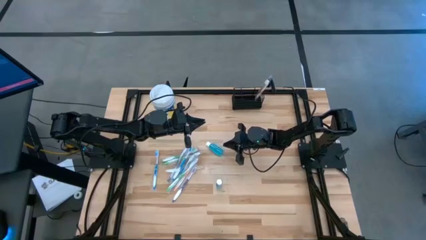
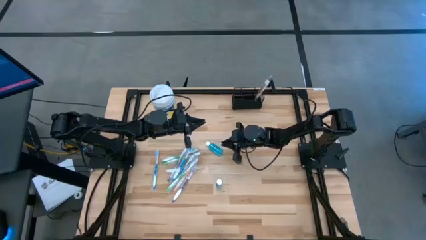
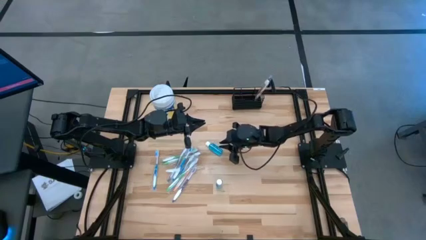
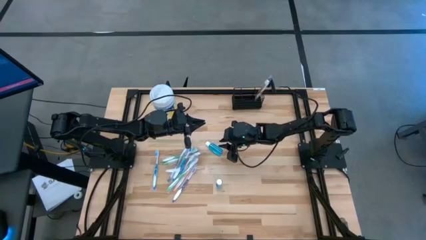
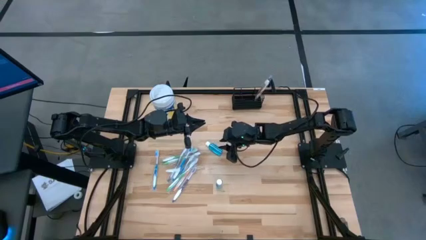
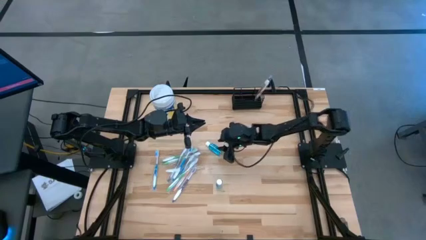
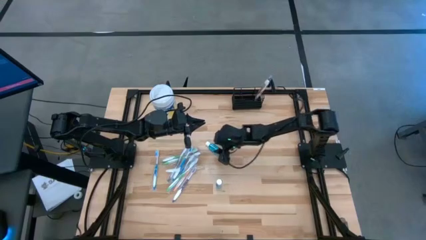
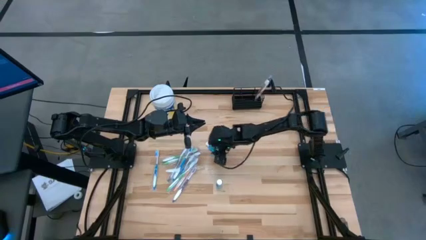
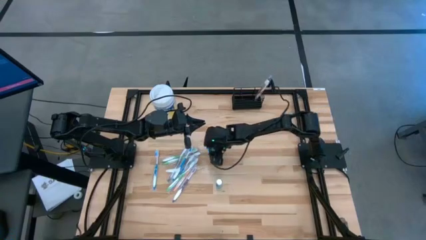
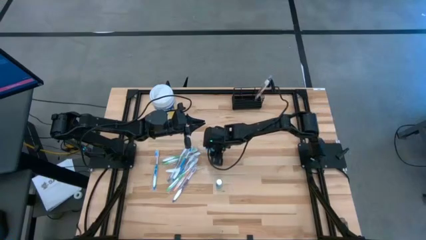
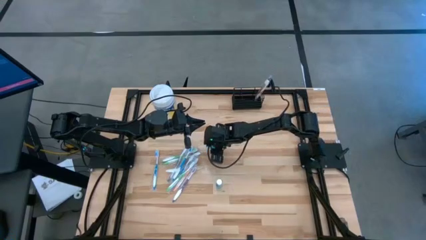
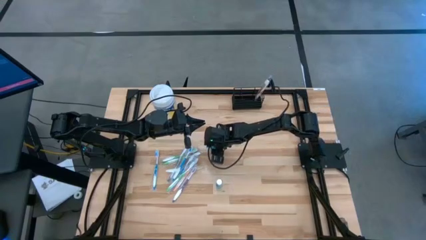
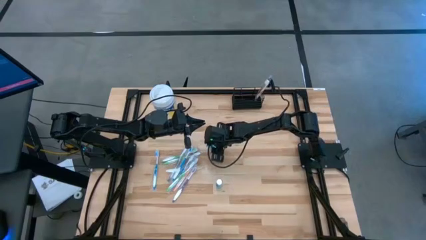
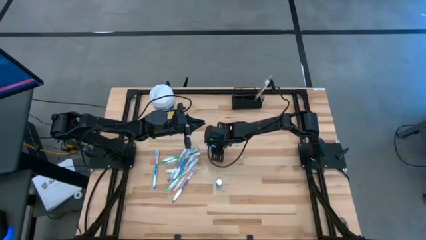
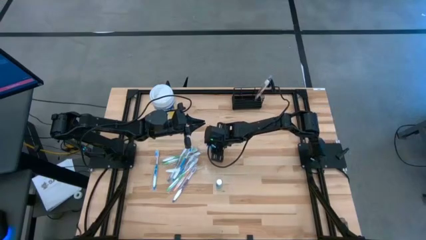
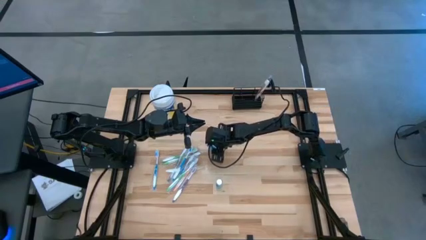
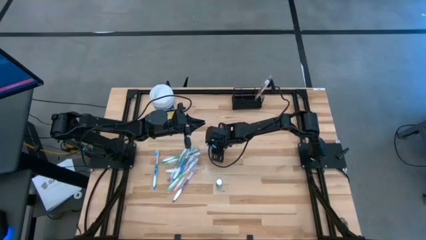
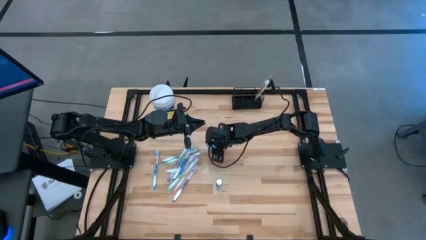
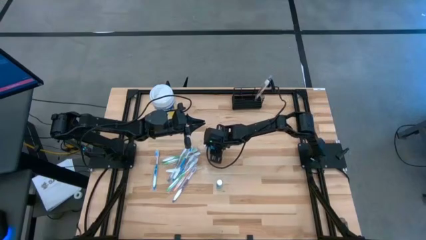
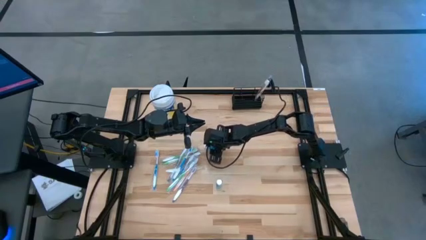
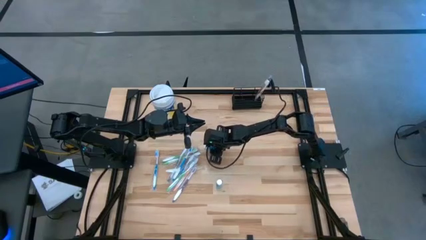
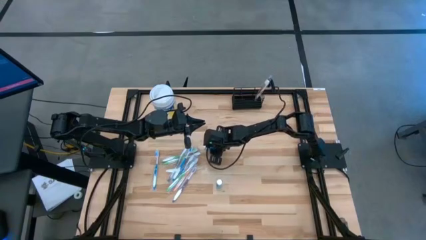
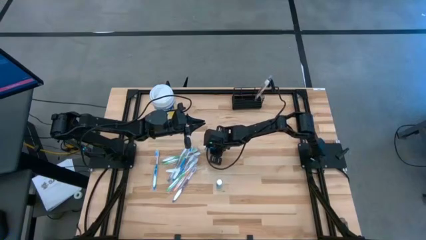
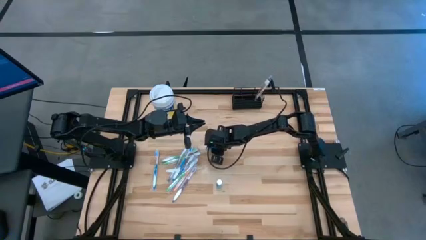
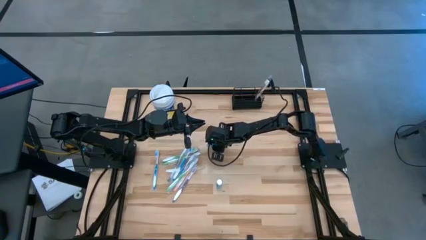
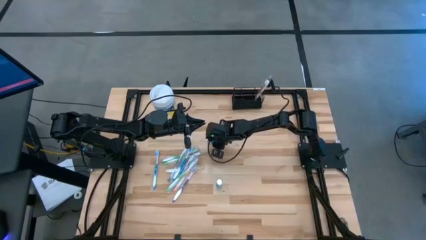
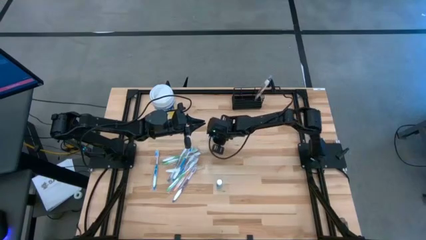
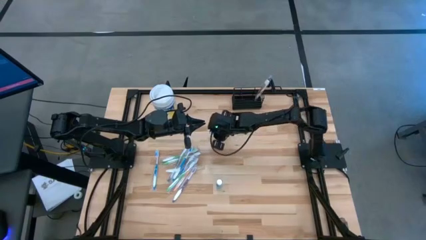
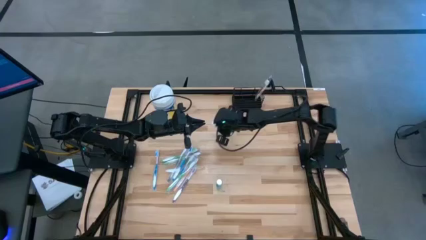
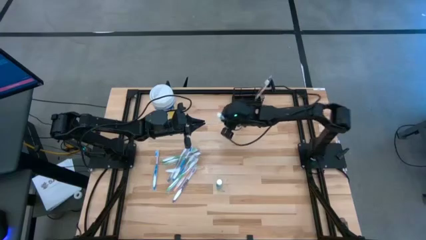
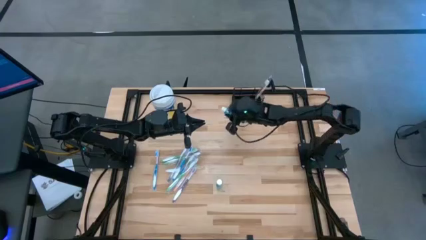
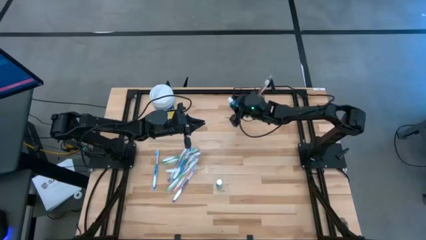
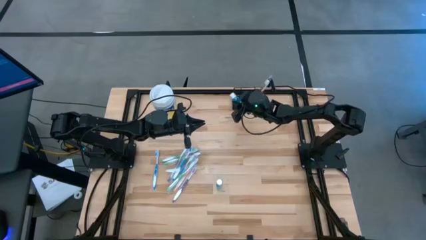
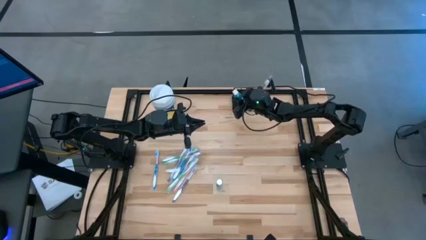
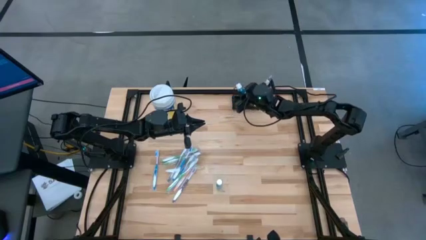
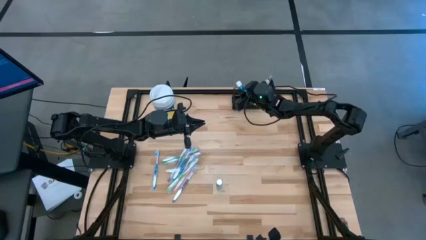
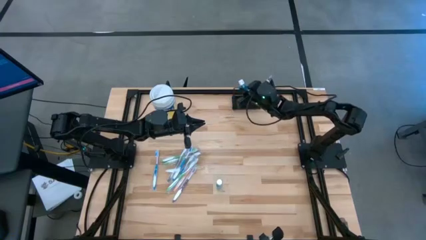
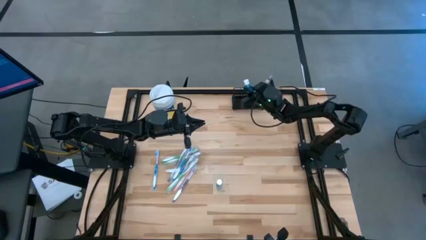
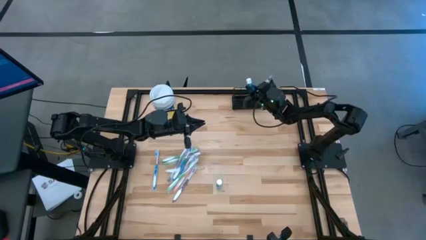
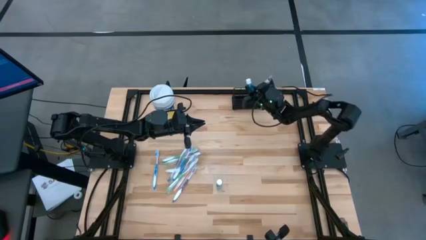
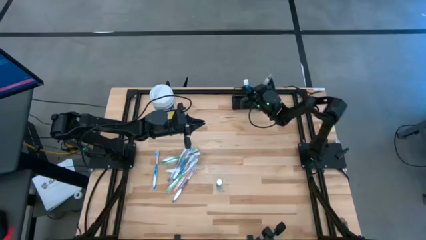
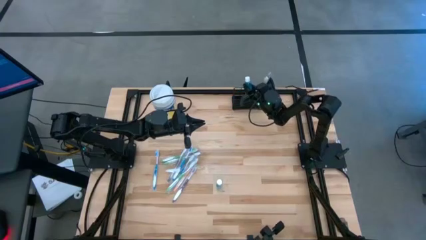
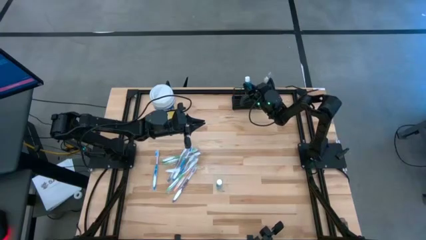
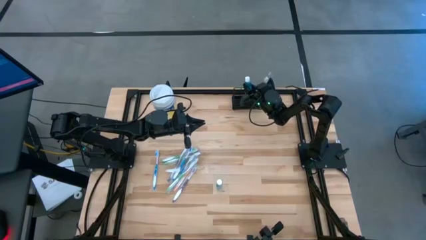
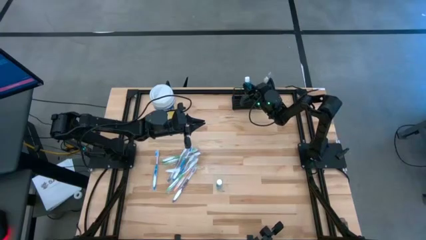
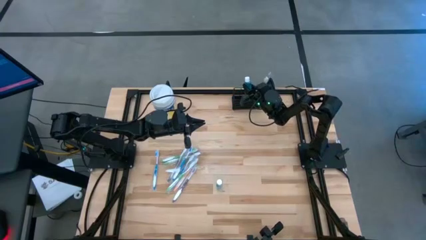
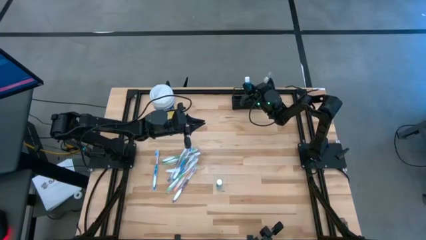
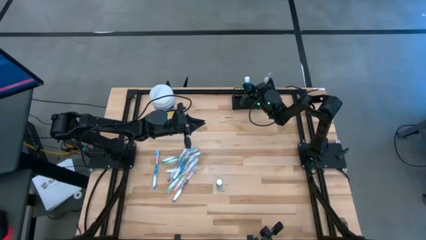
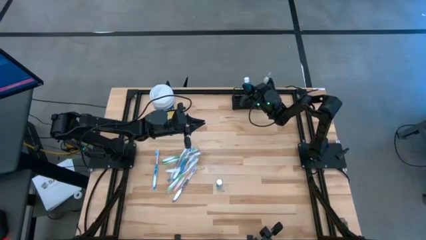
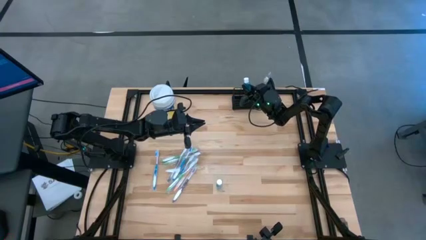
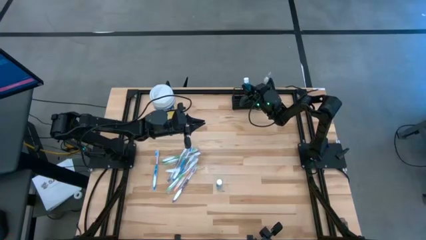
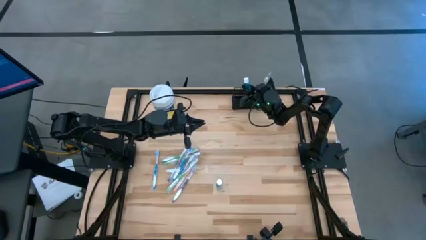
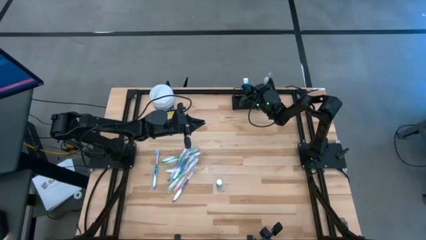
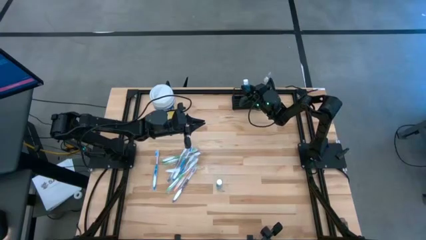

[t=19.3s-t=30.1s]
Task: Pick & Place toothbrushing station
Put the mouthwash into the black mesh organizer
